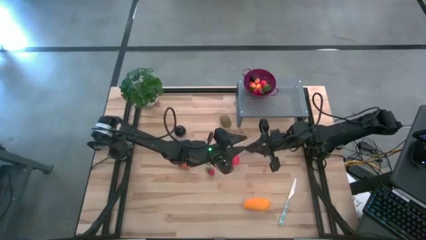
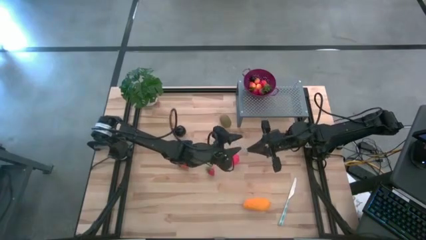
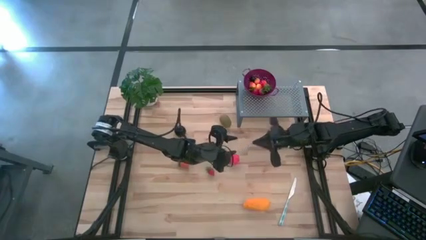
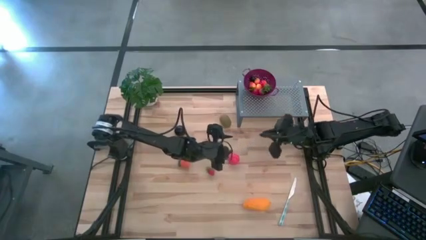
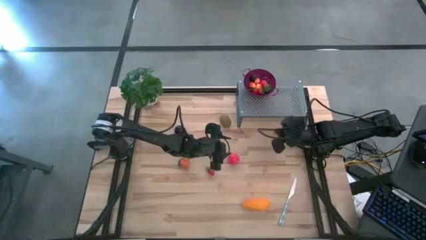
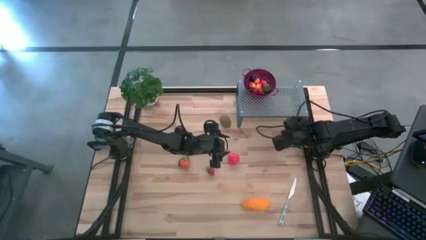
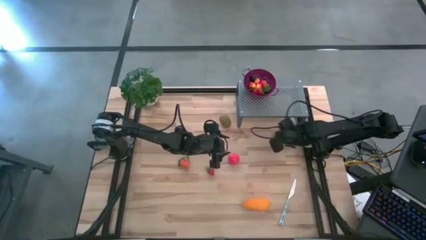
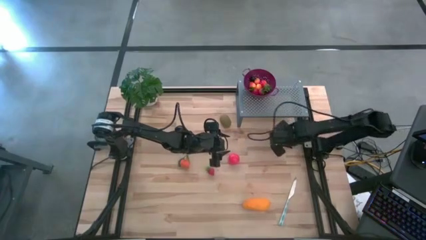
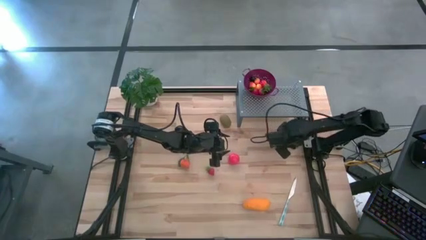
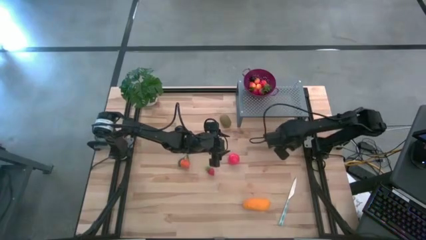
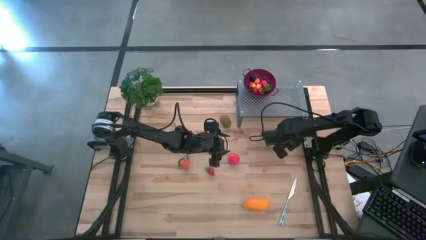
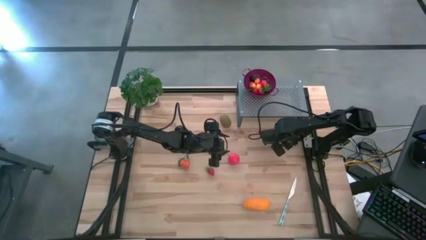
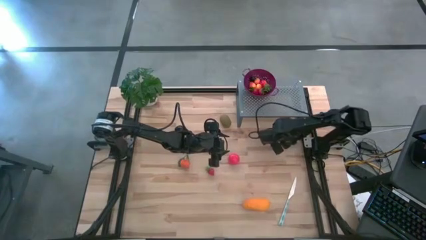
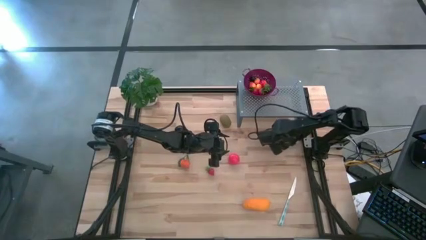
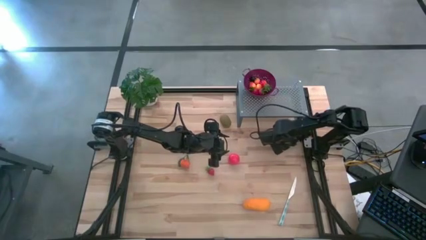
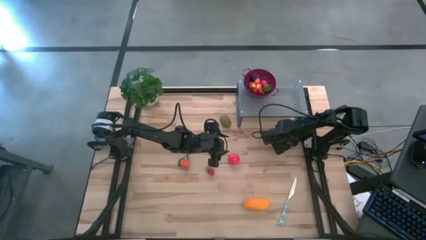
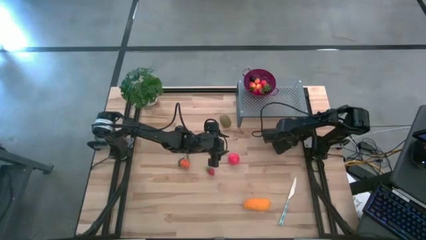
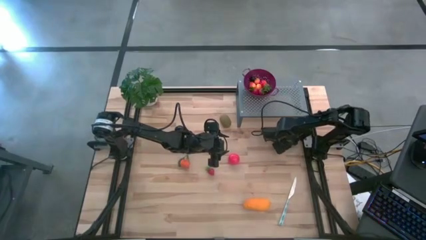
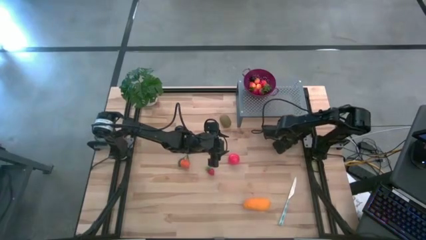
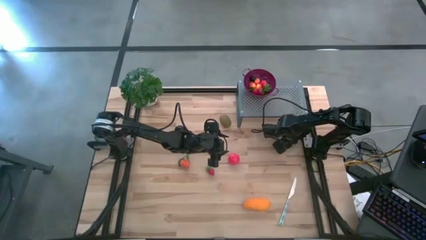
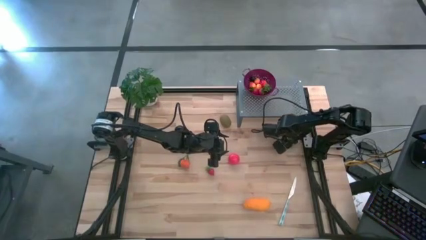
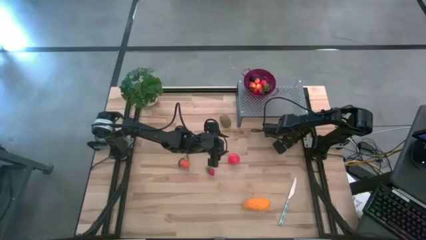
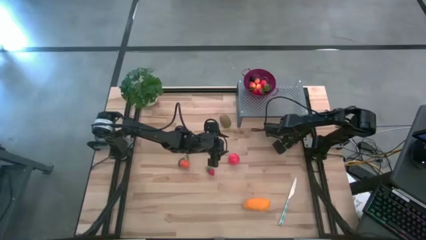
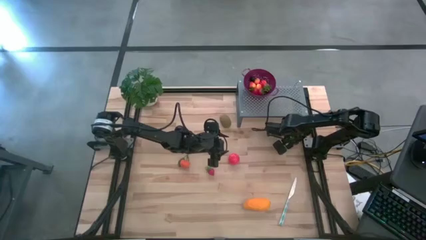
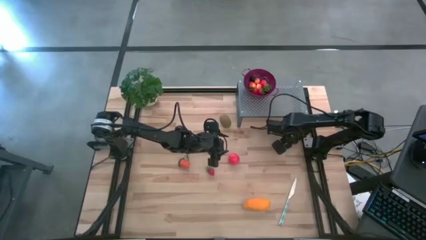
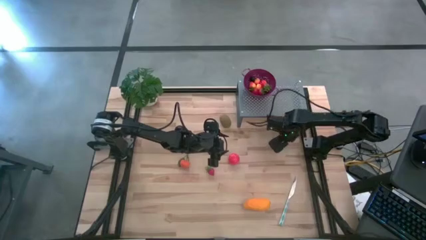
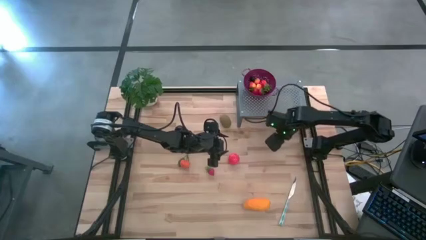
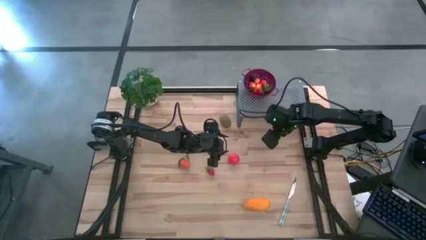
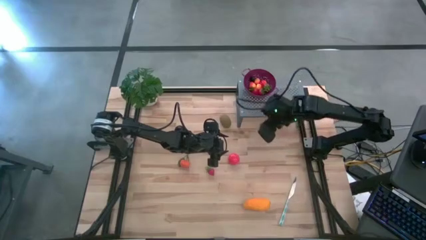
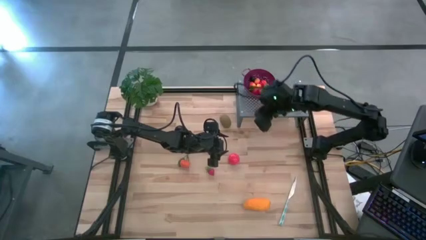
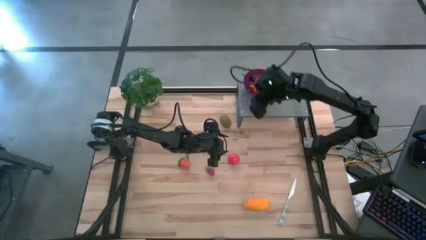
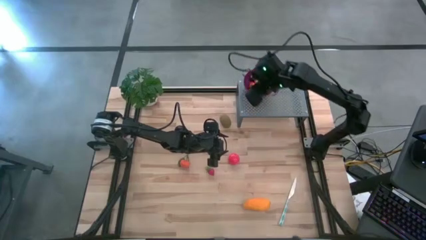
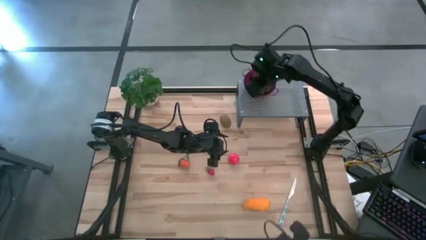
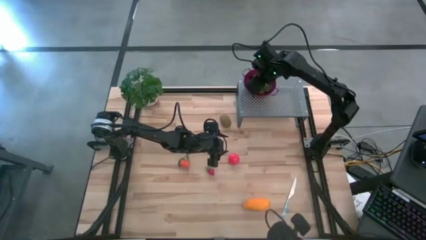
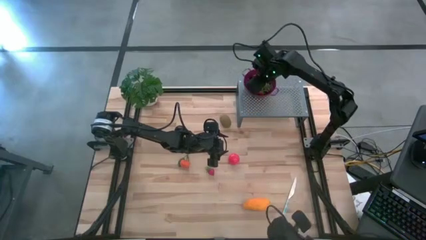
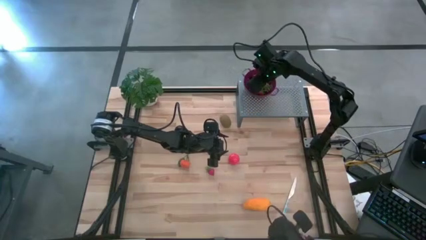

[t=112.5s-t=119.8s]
Task: Pick & Place Fruit
Put the blackberry into the violet strainer bowl on the shelf

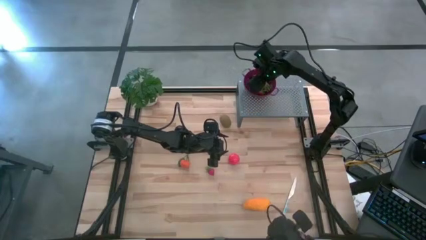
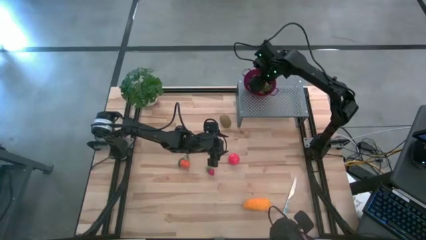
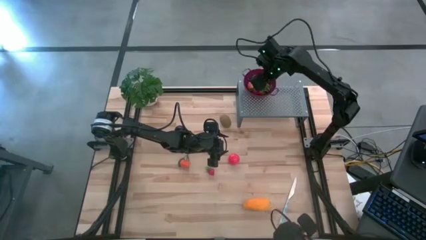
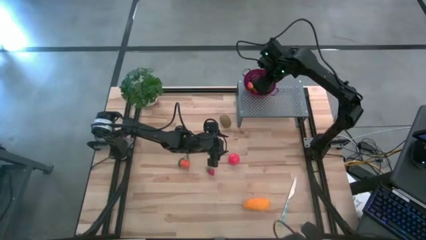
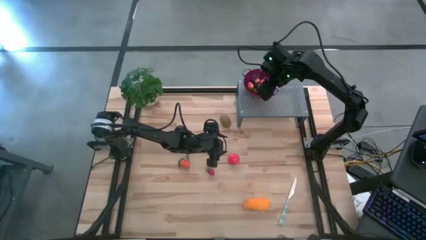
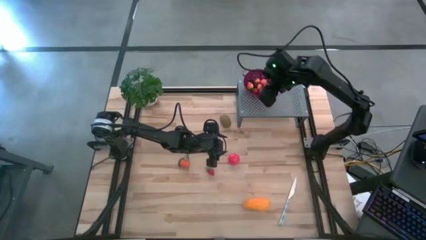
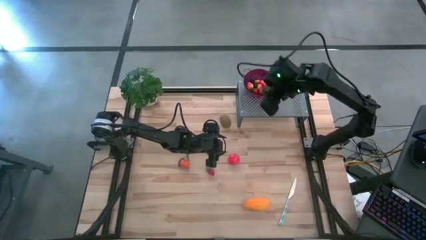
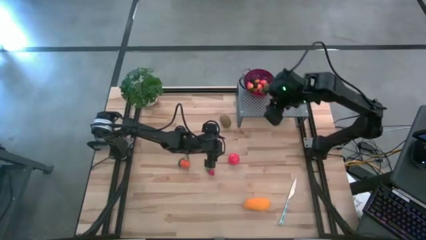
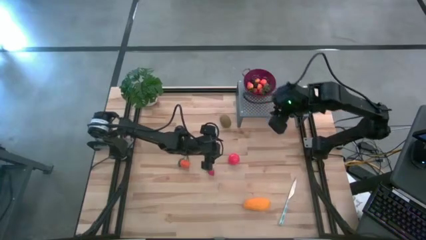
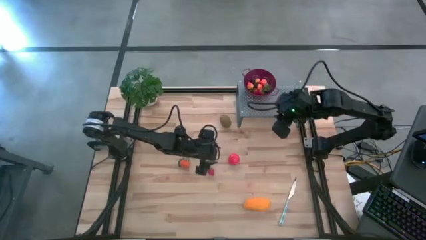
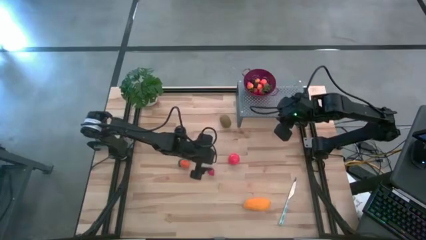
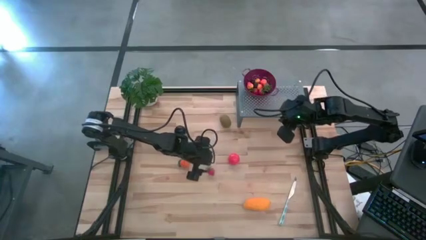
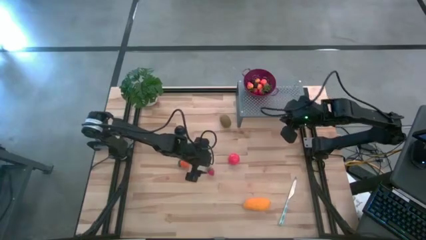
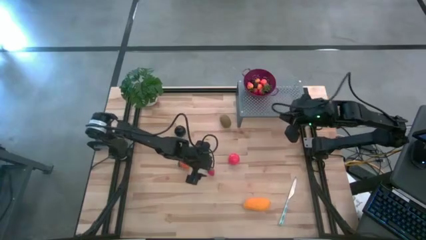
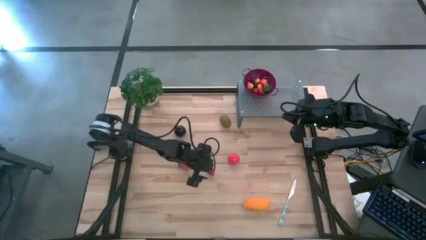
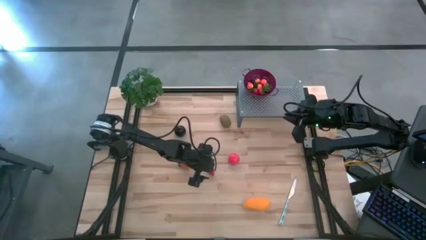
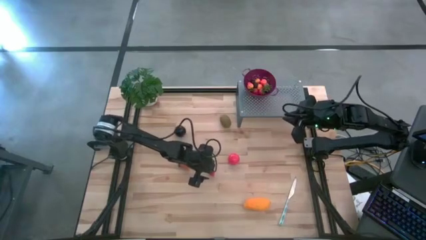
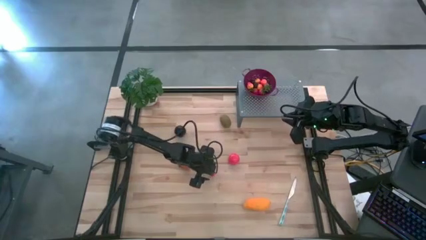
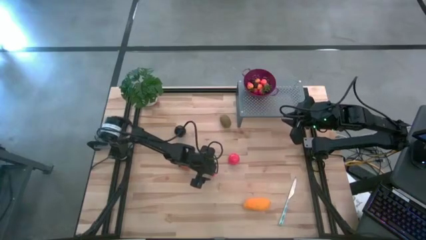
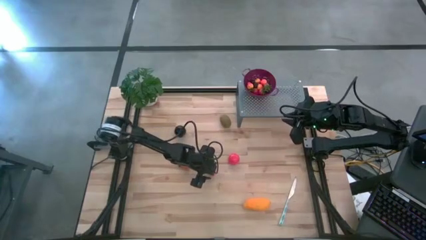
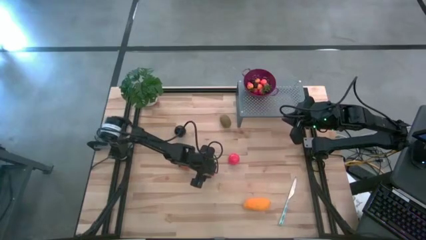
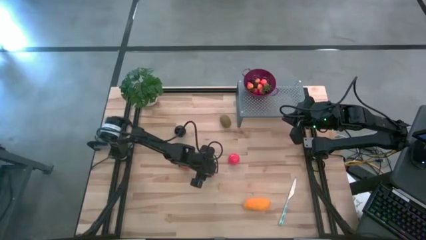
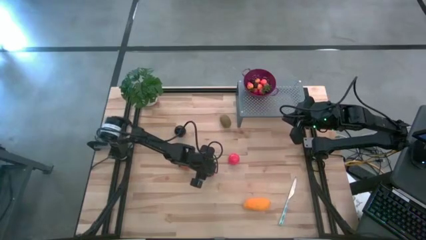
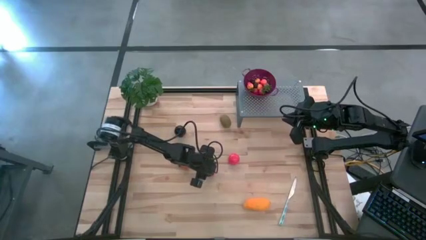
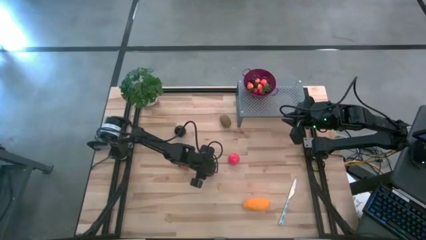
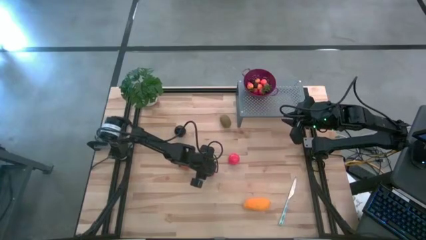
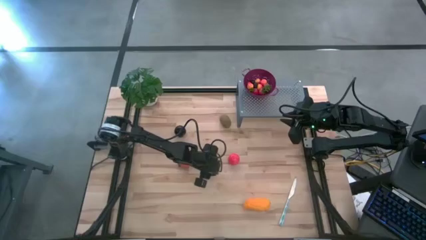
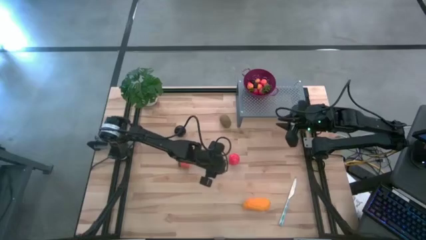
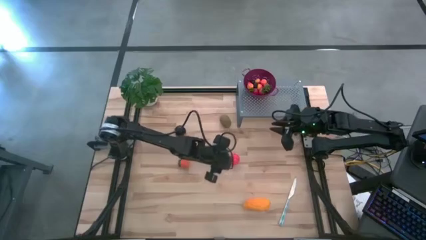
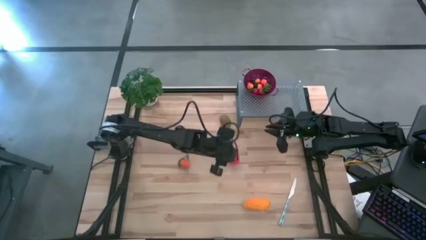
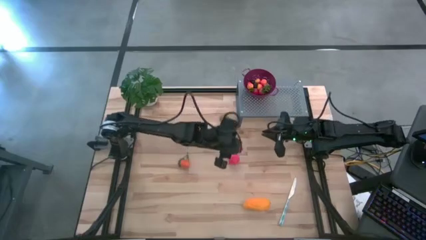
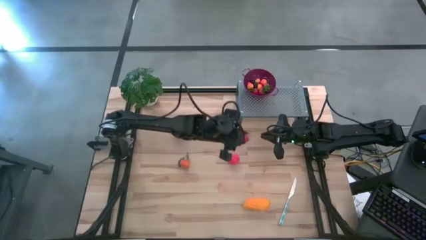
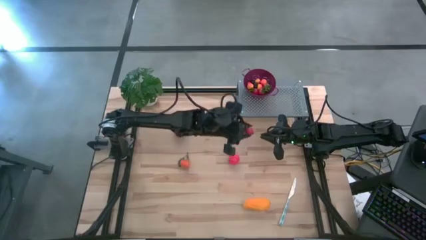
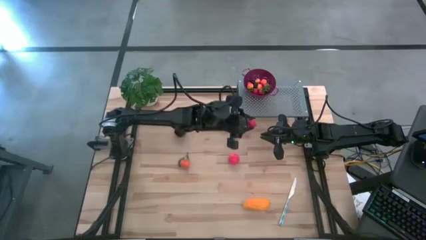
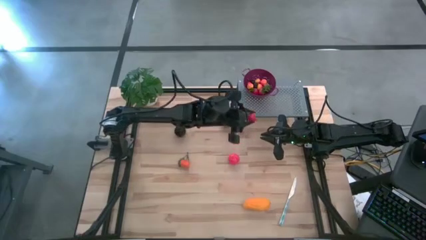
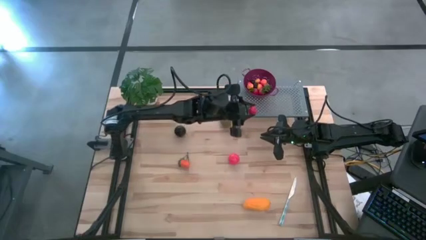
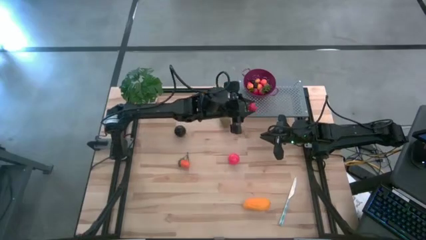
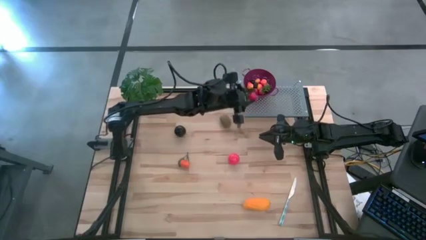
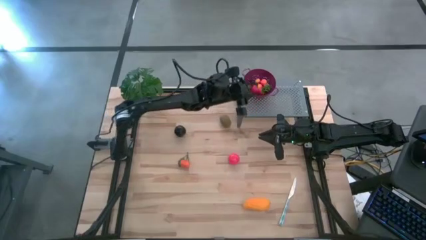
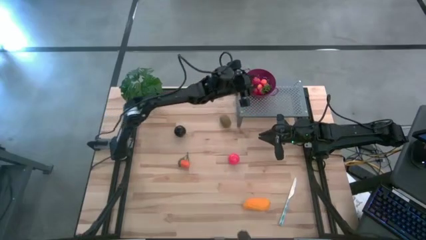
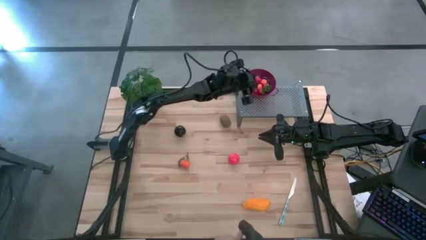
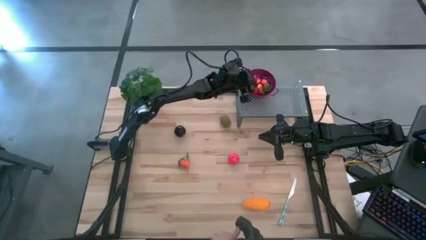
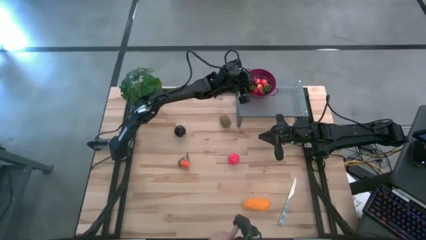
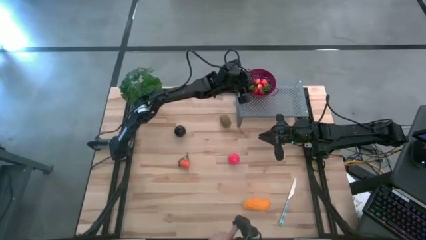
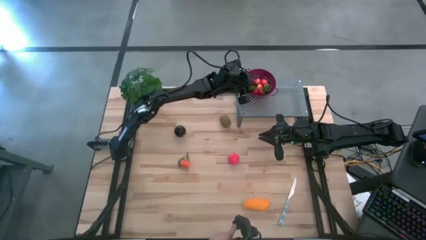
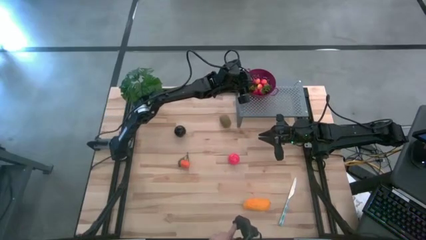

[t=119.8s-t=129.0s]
Put the strawberry into the violet strainer bowl on the shelf

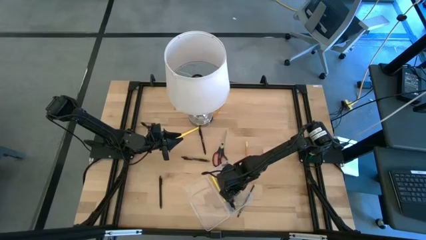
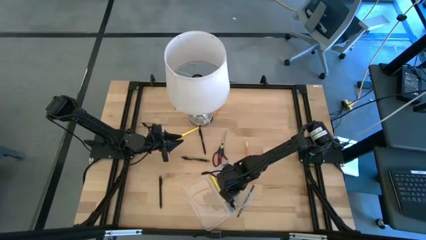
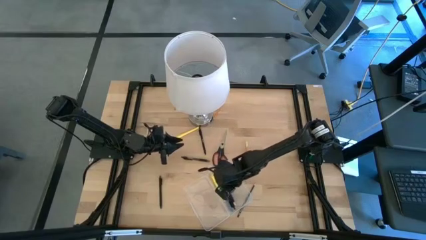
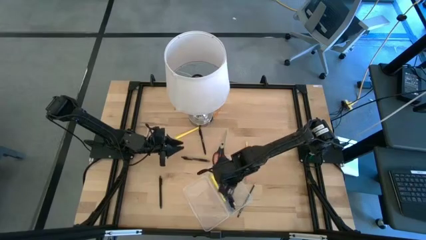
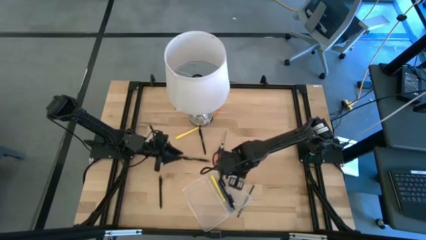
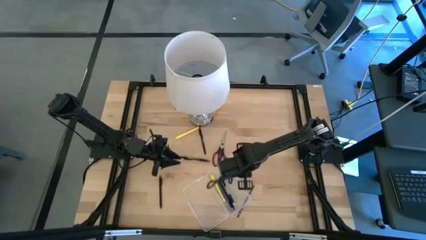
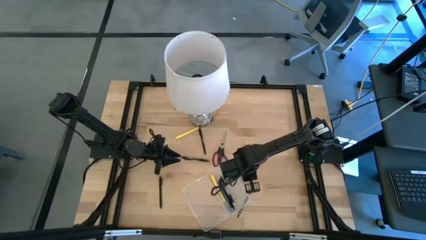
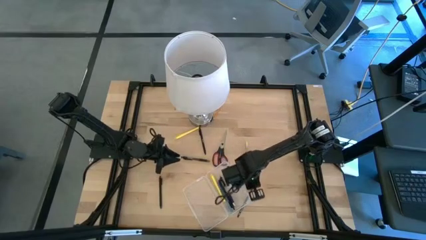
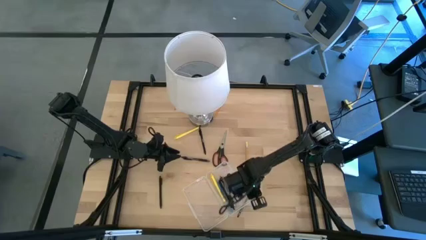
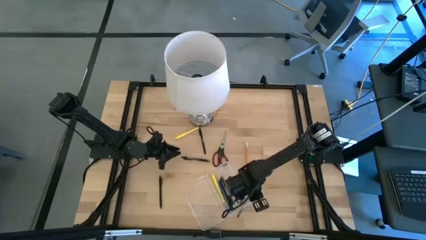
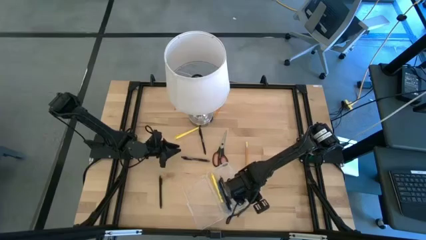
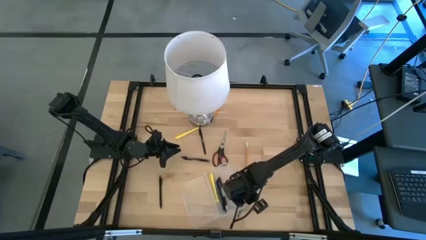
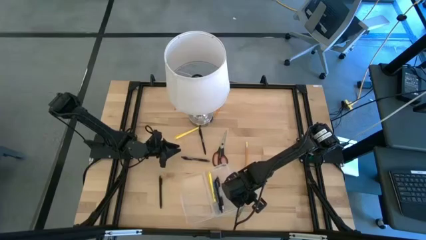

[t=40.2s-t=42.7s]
Task: Pick & place school supplies into a supply box
Adjust the transparent supply box on the table
